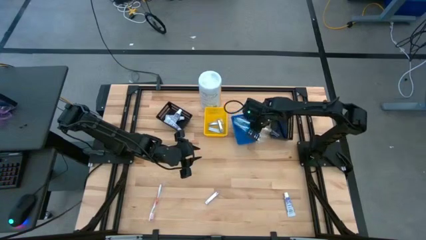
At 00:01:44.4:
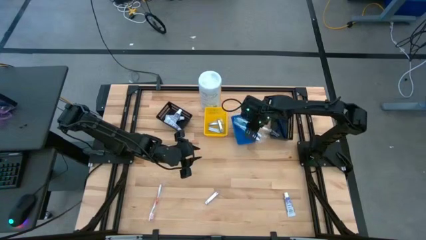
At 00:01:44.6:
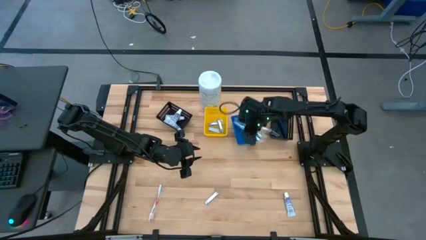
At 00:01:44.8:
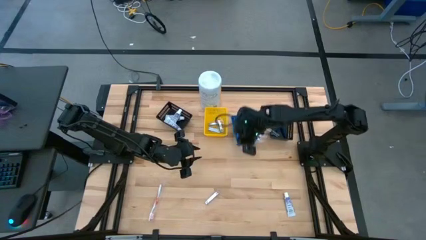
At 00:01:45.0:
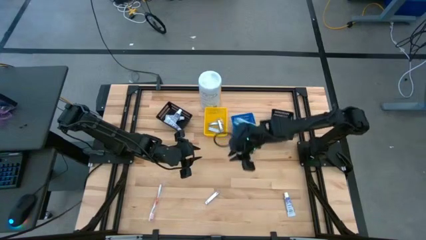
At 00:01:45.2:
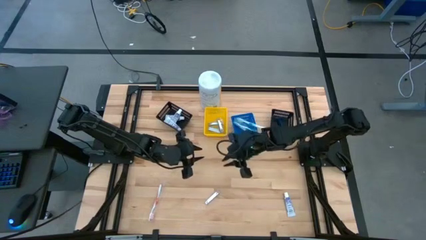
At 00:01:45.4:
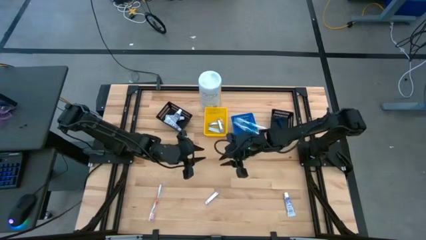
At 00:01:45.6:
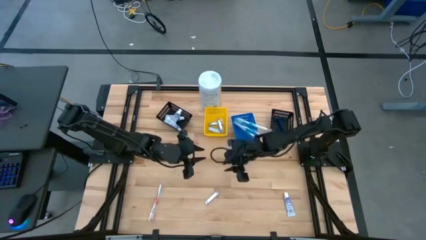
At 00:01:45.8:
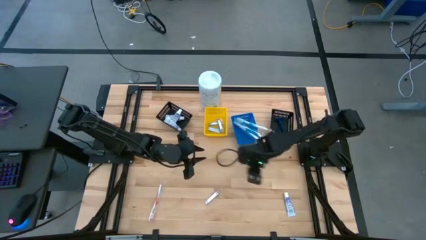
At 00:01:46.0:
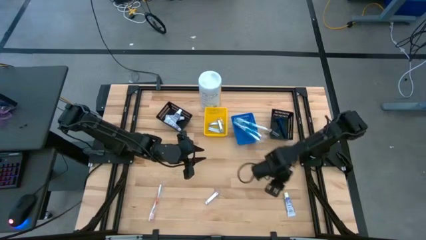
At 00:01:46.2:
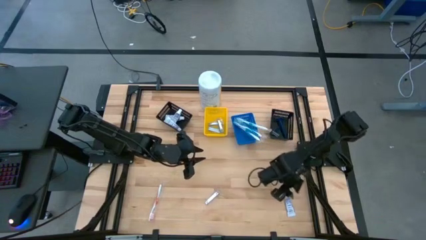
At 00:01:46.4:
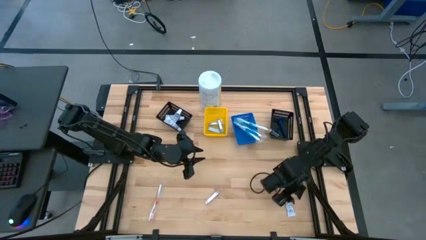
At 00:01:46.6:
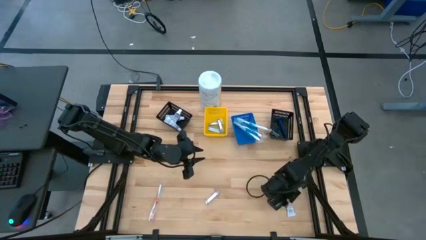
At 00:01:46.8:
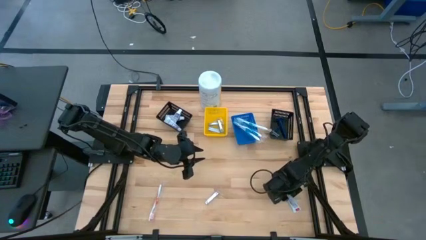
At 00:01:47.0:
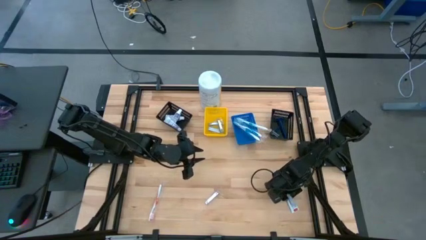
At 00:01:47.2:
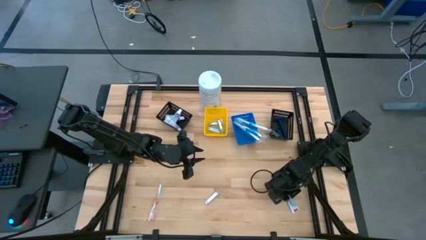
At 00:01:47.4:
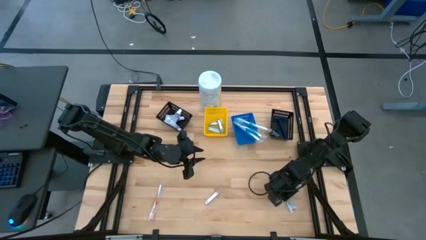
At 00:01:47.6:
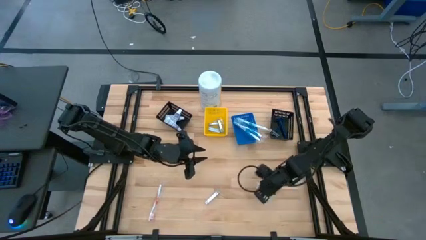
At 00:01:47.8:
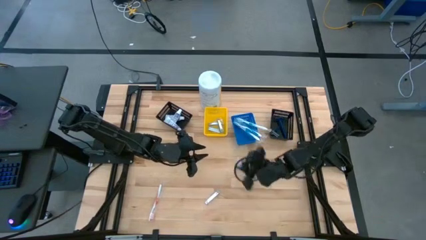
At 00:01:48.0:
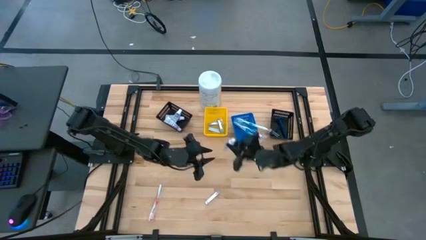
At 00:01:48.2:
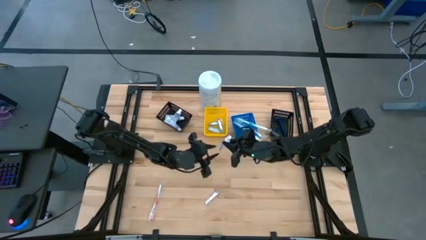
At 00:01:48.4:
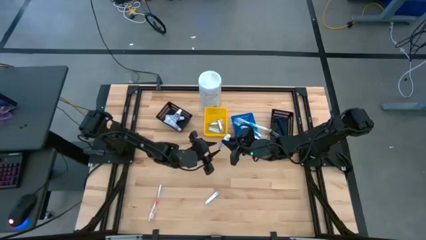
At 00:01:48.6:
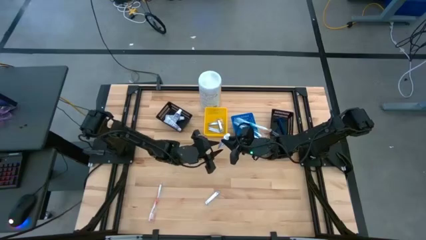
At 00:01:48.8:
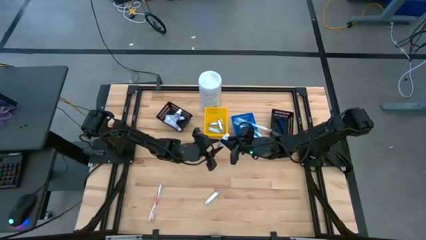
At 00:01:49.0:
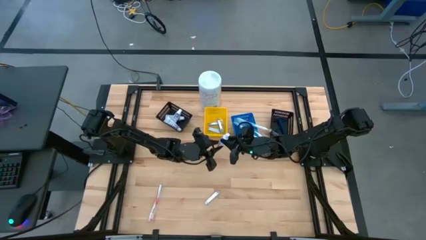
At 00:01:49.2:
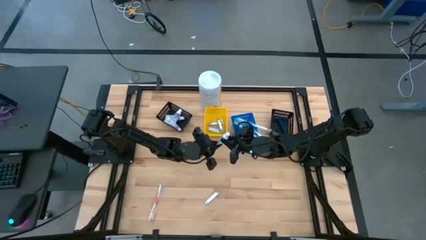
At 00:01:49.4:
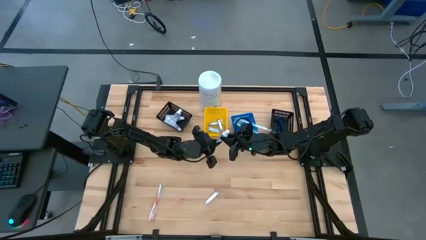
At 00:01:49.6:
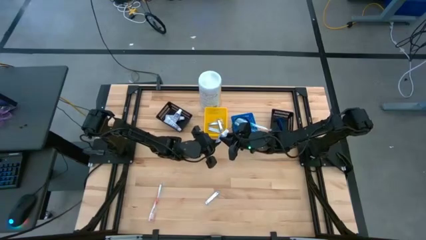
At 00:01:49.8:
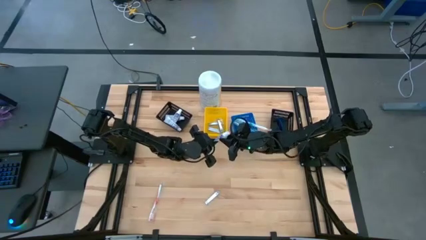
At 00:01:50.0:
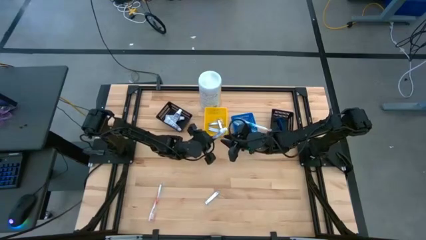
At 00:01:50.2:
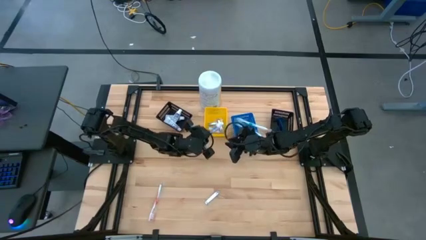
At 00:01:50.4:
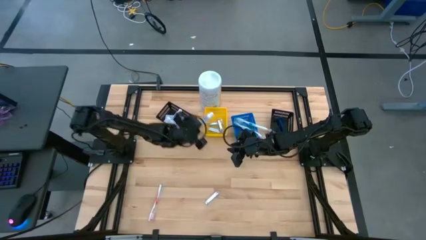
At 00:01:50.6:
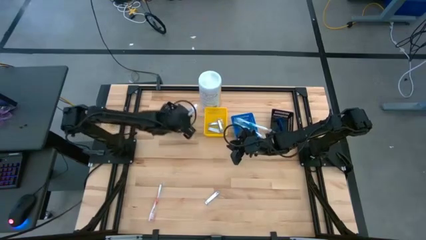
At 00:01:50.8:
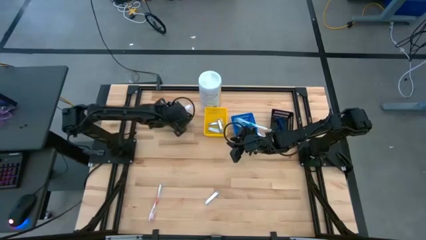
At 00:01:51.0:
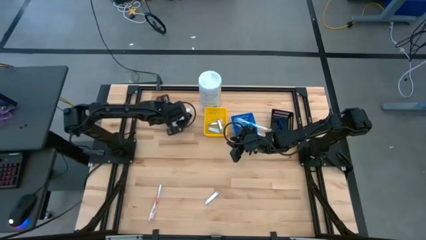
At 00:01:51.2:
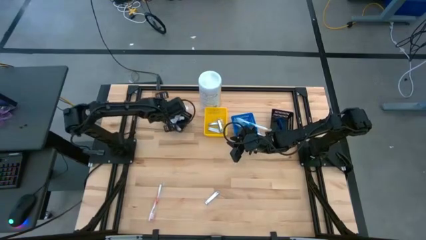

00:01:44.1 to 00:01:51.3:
Task: Pick & Place Travel size toiletries
Put the white toothpaste into the left black bin

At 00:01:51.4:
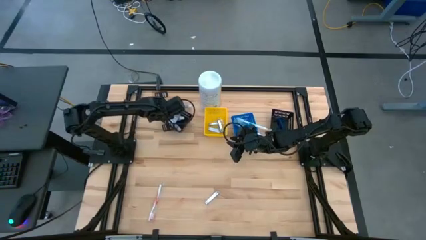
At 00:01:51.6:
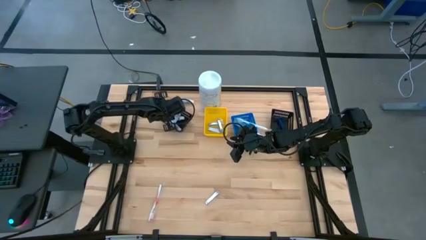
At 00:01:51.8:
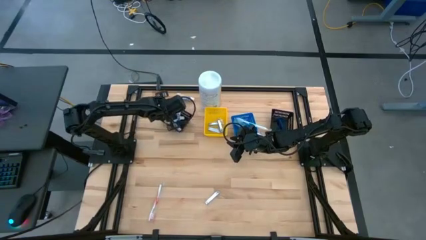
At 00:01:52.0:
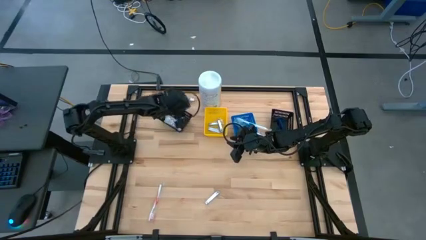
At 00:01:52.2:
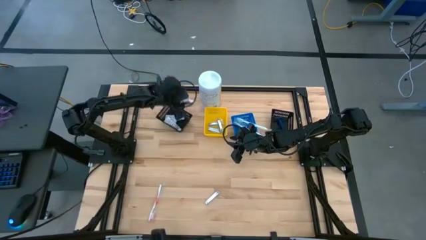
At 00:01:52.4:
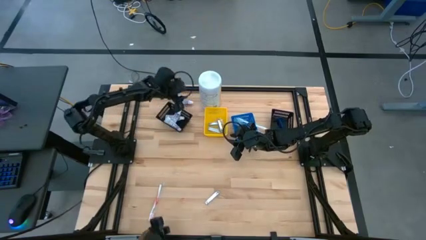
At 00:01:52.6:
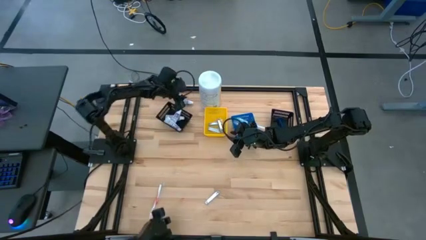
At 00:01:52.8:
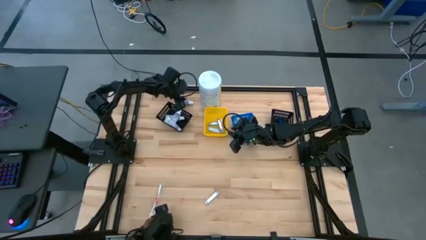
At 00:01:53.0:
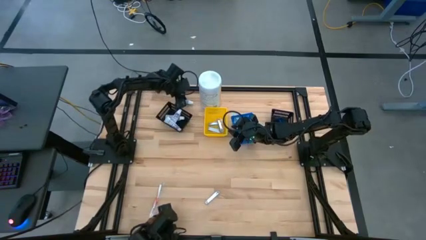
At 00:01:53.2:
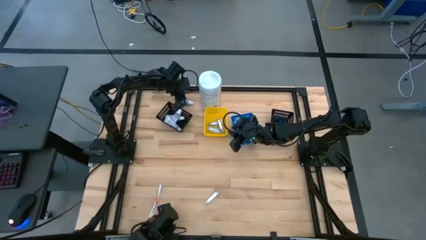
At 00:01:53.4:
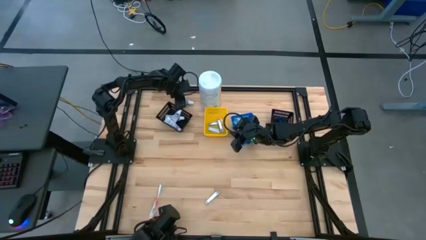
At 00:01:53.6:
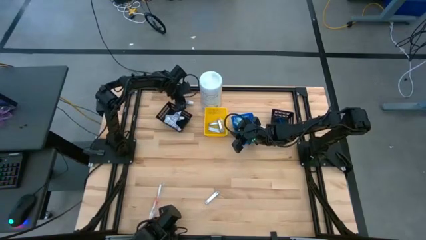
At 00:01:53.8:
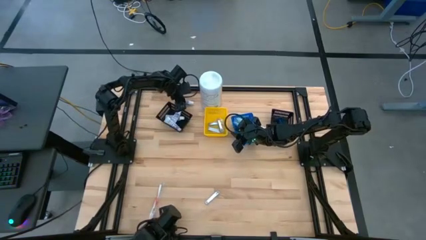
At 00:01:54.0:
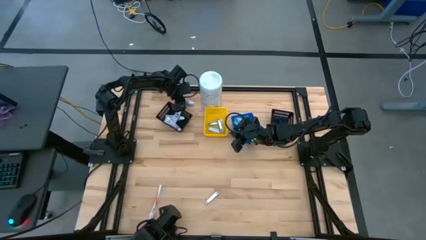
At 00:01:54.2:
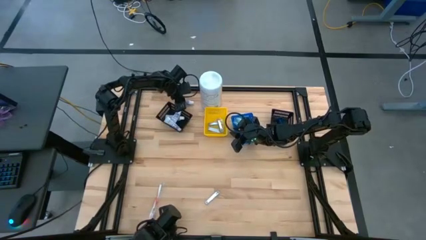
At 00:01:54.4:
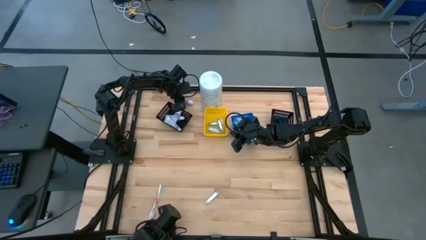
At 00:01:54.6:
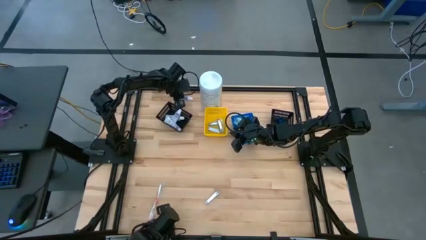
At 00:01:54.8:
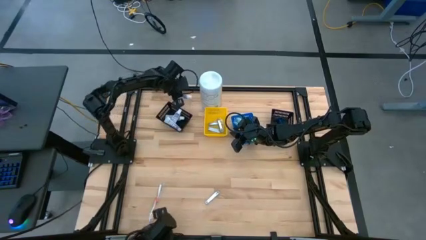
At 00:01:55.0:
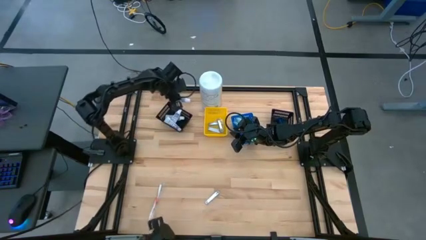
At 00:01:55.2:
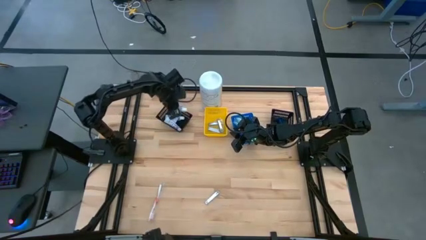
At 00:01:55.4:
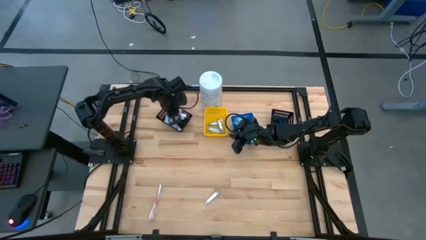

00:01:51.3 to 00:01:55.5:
Put the white toothpaste into the left black bin

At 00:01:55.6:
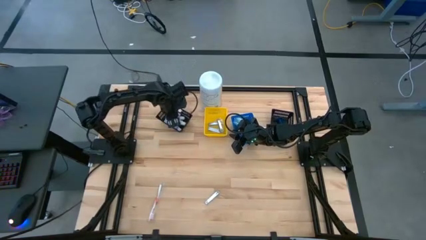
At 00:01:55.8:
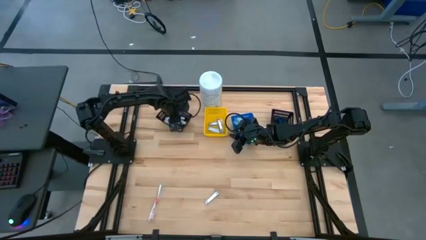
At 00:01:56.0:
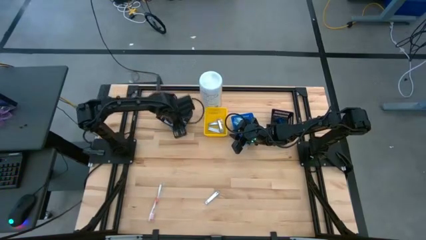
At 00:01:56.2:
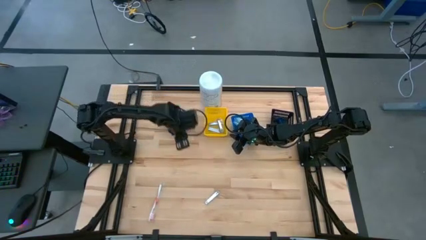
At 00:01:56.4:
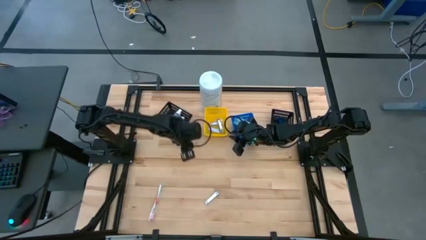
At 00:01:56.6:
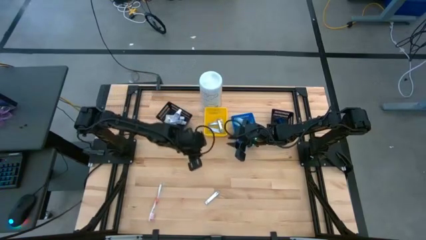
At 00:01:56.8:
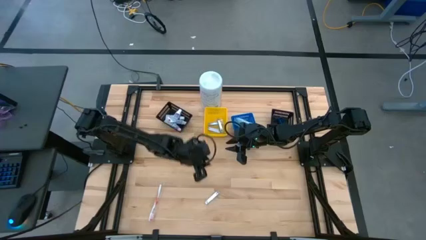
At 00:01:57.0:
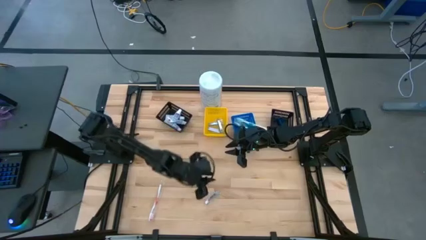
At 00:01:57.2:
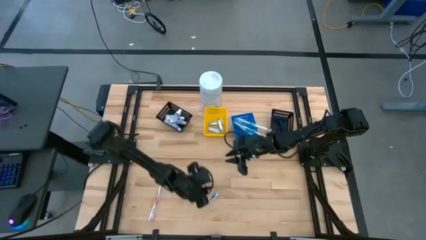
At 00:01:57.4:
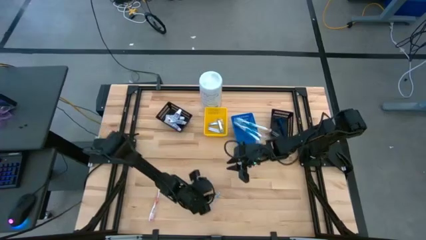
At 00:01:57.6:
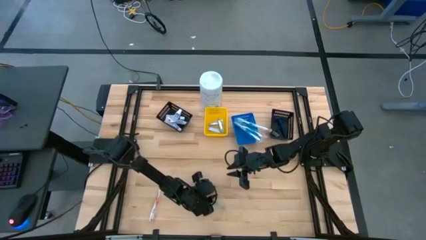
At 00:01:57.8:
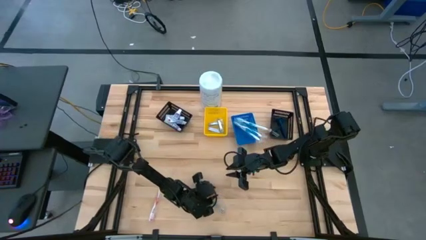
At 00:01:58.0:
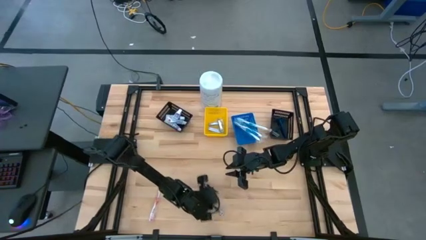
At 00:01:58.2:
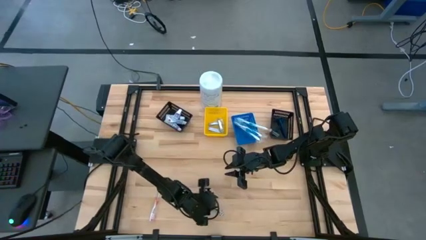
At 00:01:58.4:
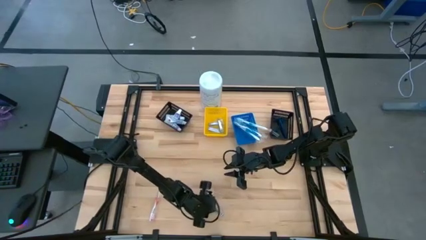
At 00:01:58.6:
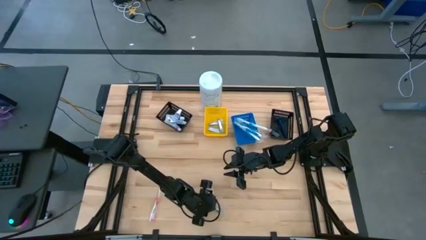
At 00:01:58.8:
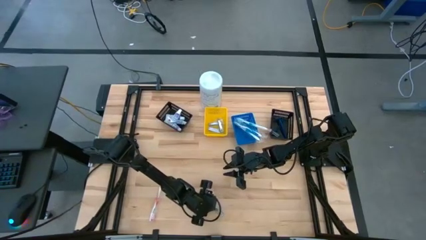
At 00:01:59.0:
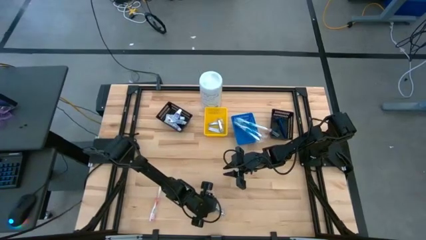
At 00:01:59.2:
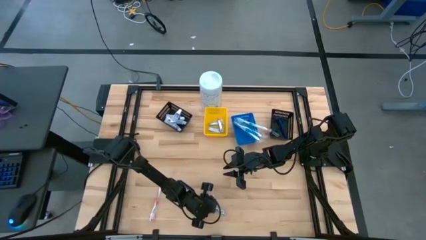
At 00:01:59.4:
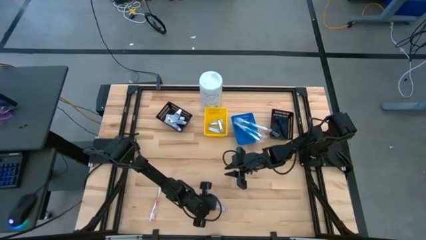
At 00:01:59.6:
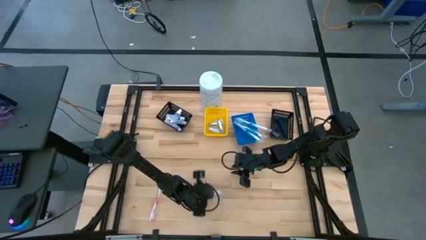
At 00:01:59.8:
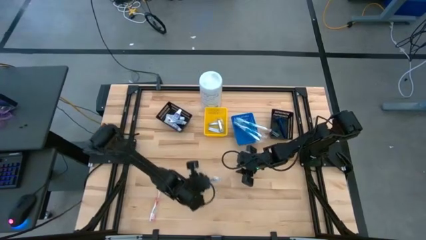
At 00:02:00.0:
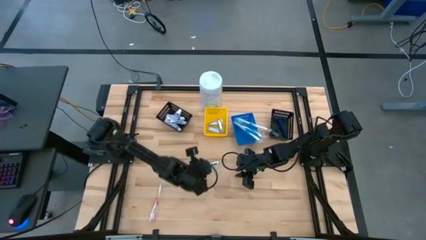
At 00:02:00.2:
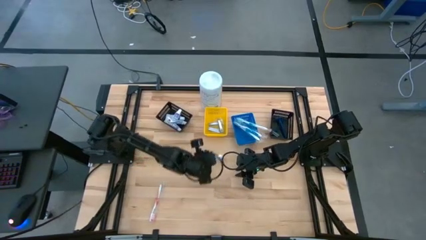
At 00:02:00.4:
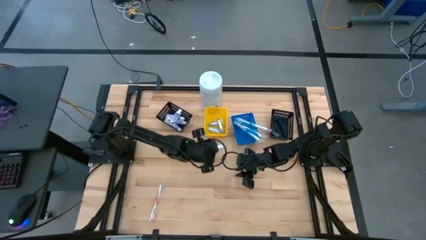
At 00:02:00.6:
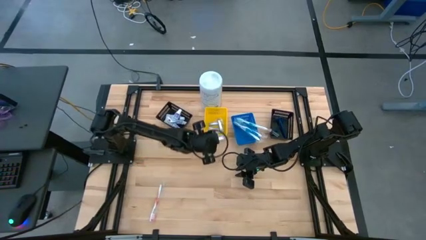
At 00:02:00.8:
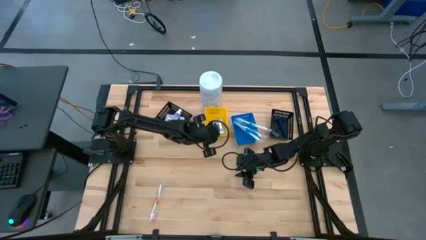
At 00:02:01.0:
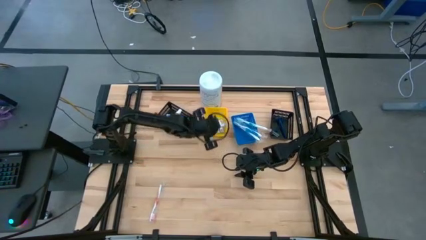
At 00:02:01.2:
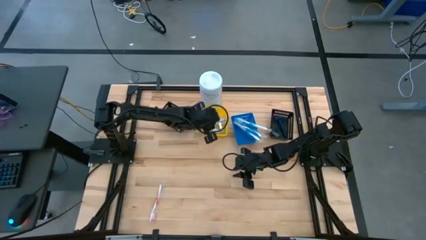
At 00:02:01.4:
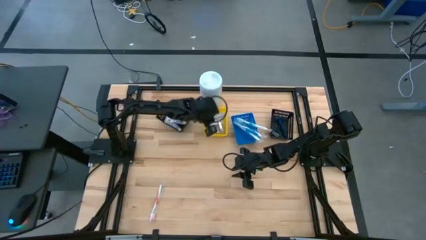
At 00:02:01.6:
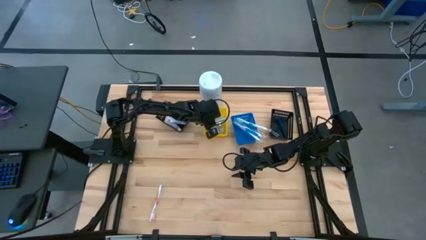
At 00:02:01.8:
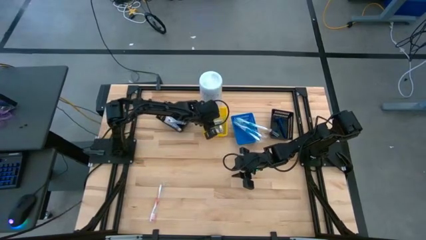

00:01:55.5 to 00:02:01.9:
Put the silver nail cutter into the yellow bin
